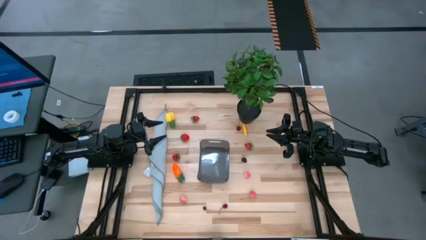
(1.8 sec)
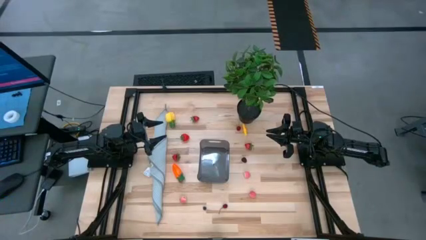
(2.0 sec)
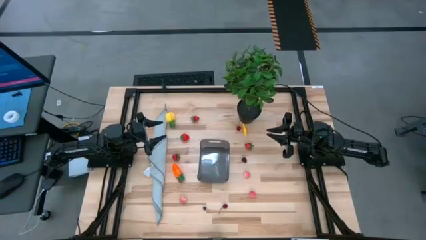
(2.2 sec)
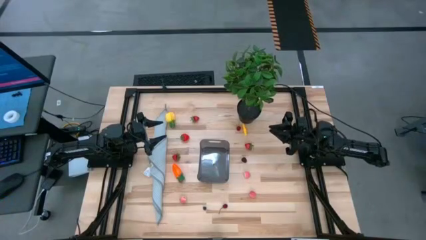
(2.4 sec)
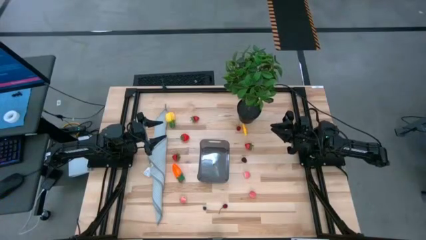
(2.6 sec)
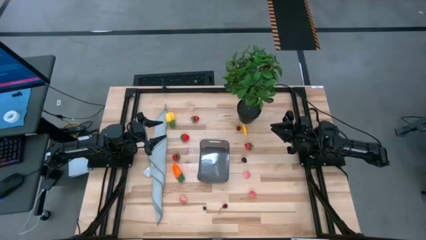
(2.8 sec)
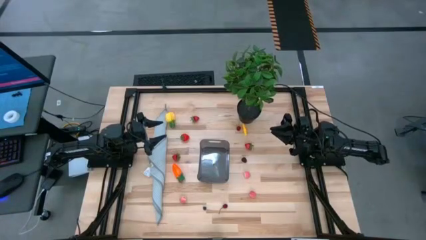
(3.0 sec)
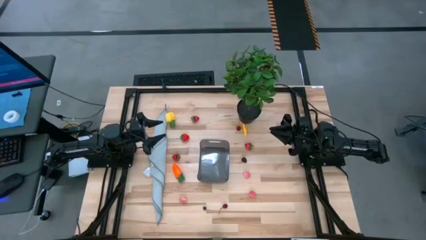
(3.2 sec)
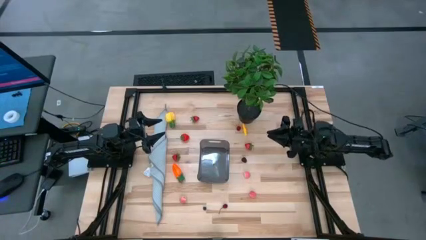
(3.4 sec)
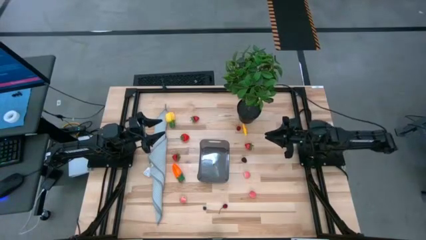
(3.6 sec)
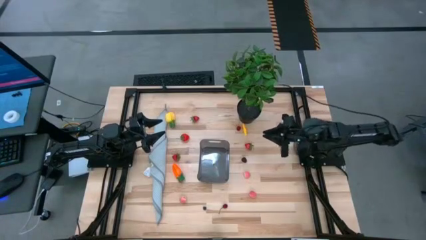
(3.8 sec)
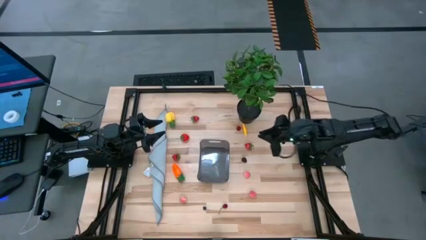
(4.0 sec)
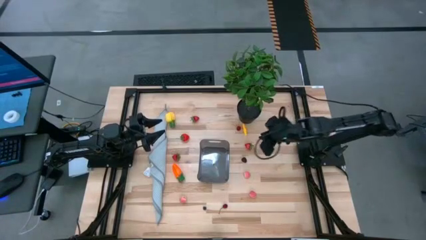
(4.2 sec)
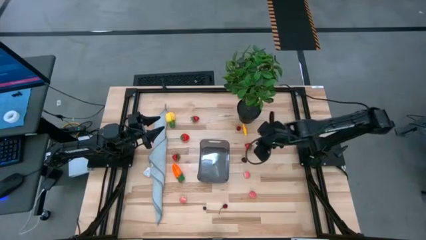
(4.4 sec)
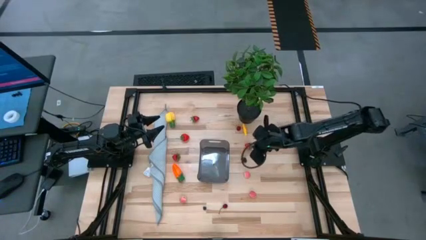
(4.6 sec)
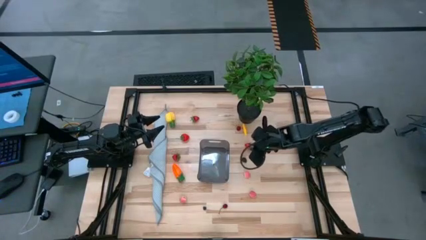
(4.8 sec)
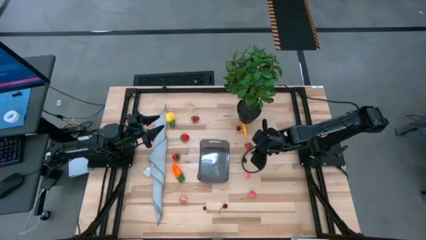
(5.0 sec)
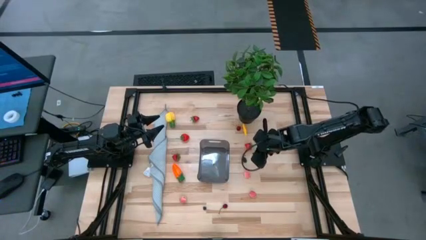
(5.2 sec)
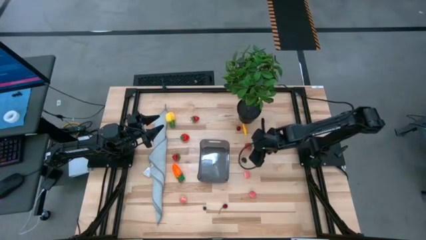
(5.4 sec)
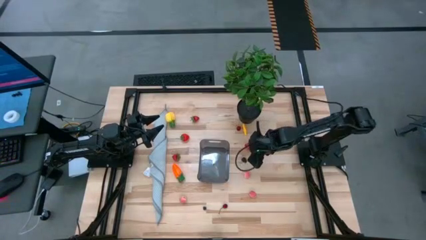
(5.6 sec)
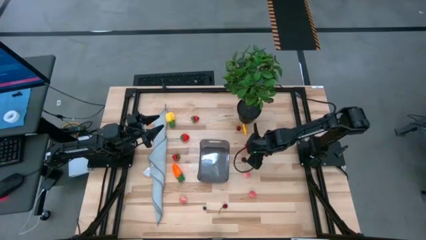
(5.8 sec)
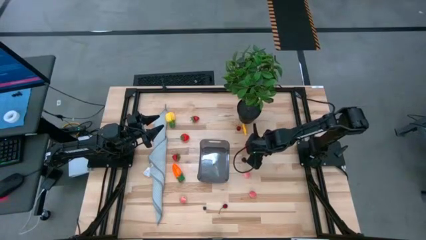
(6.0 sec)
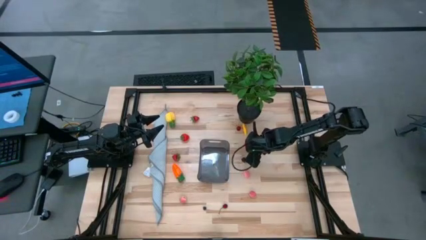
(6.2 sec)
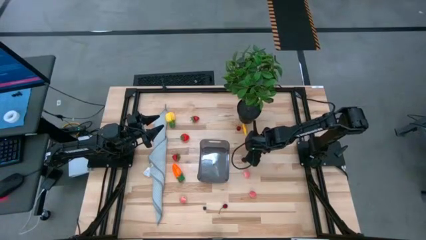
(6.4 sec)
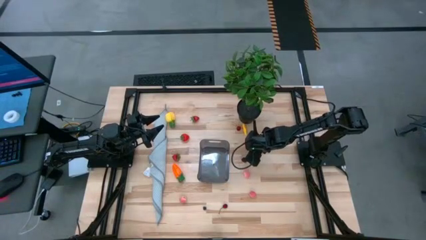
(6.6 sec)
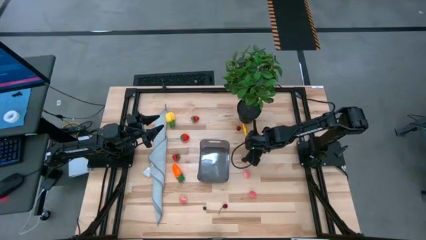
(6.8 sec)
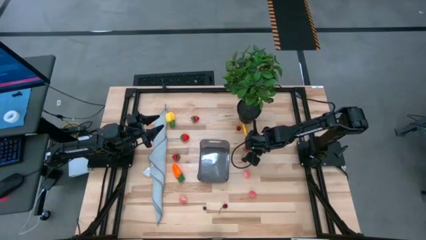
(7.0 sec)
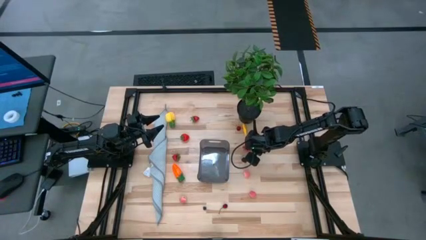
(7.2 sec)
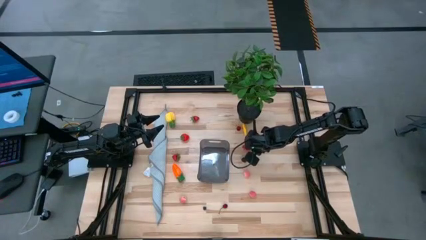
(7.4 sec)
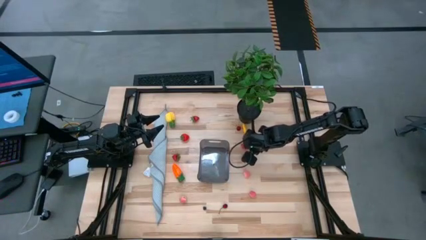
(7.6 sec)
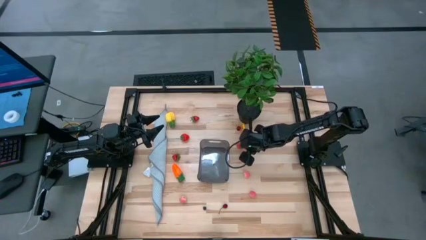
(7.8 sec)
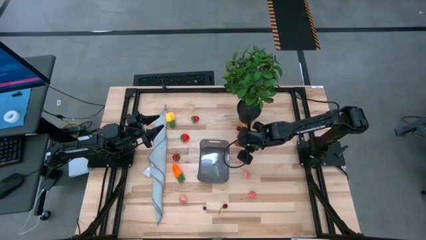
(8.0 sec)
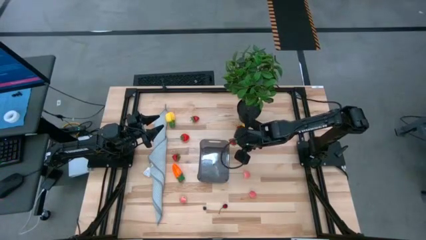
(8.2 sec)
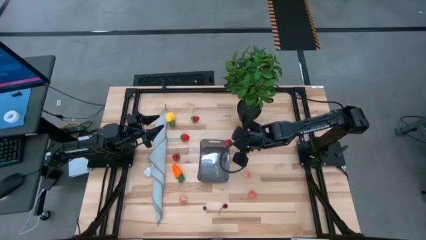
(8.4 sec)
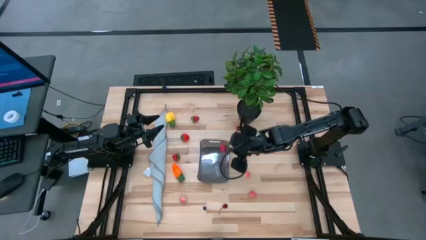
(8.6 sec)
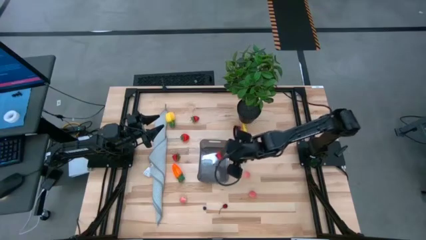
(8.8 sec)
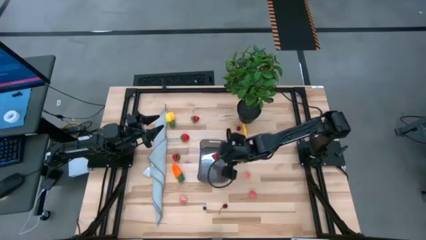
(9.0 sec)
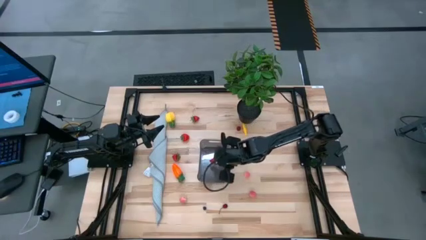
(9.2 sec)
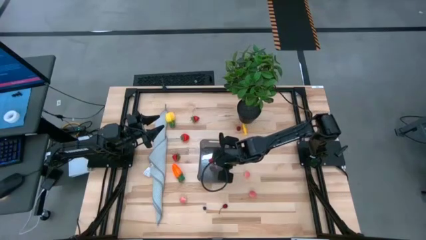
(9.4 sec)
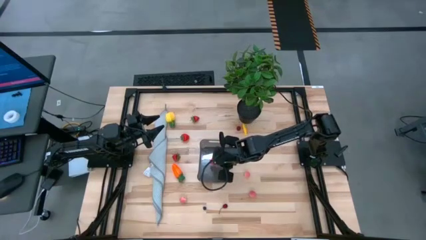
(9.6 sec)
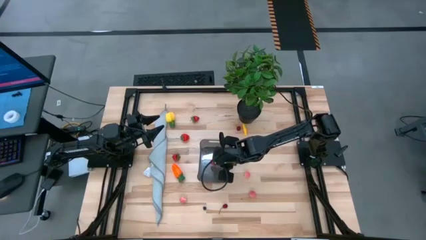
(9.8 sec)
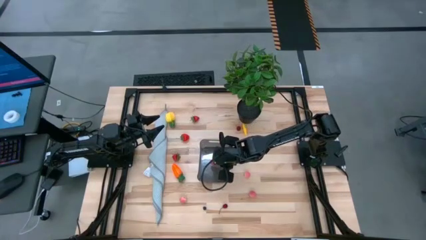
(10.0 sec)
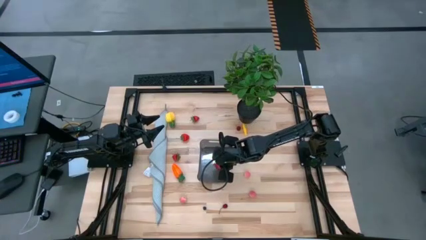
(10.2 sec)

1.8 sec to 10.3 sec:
Task: Pick and placing Produce into tupperware
Put the strawberry into the bin

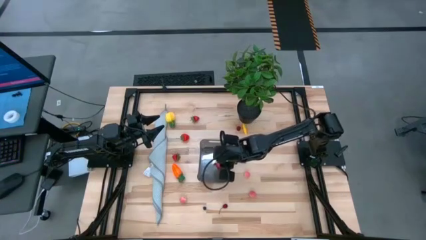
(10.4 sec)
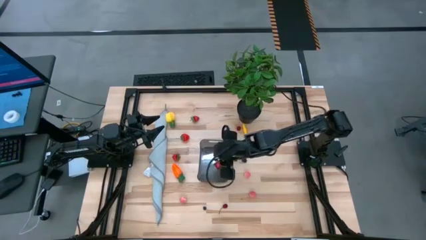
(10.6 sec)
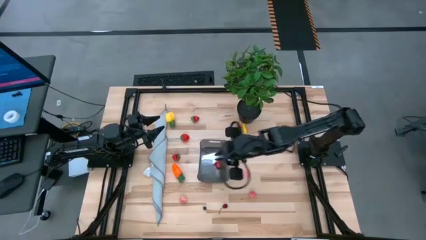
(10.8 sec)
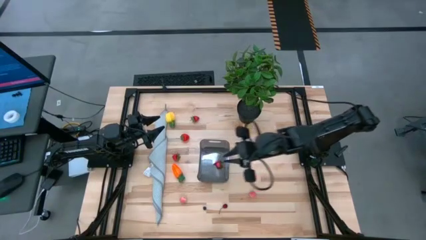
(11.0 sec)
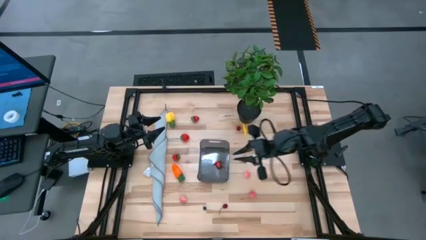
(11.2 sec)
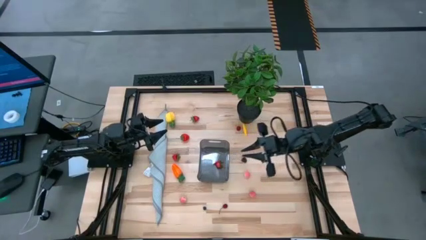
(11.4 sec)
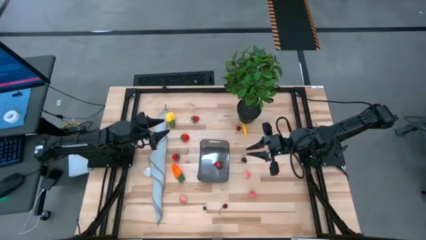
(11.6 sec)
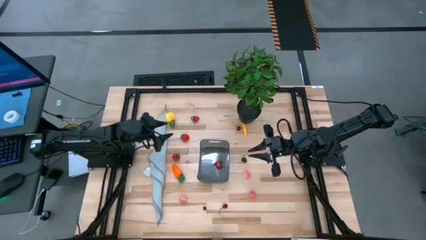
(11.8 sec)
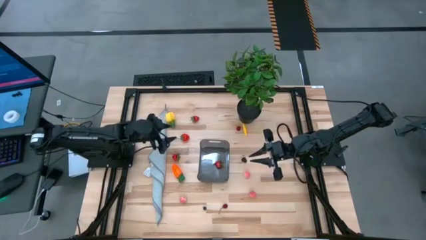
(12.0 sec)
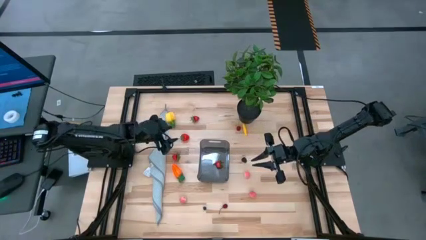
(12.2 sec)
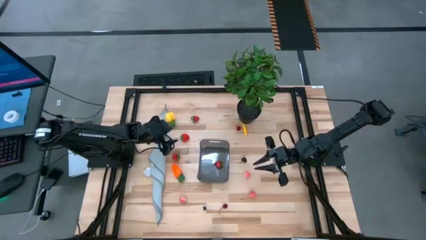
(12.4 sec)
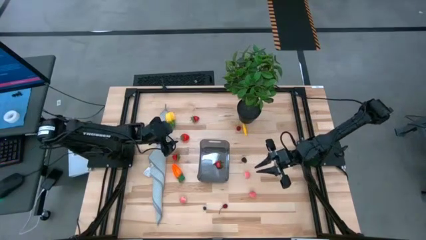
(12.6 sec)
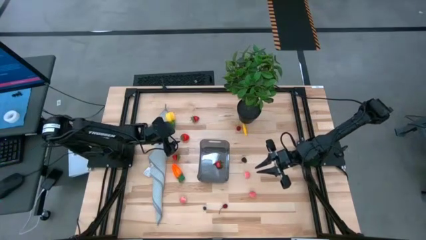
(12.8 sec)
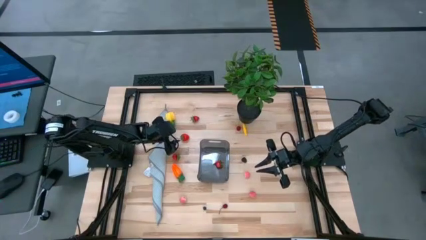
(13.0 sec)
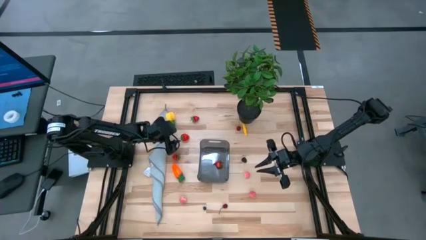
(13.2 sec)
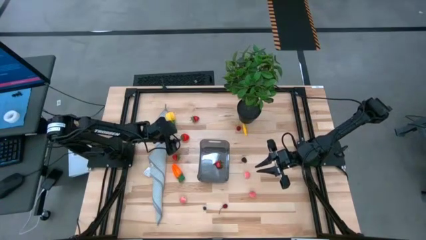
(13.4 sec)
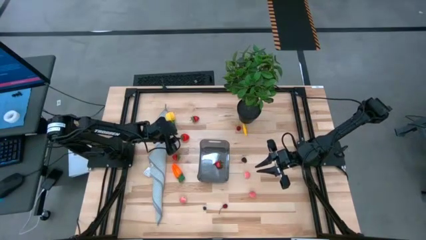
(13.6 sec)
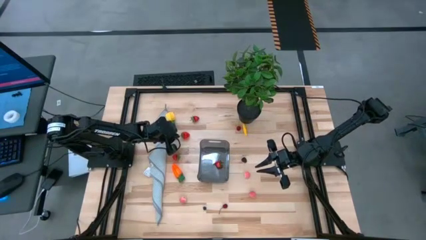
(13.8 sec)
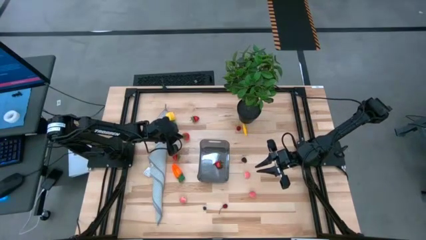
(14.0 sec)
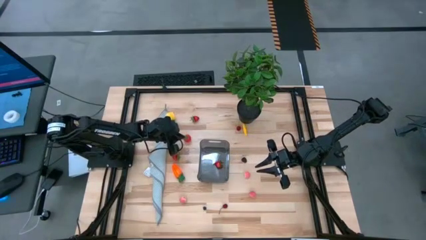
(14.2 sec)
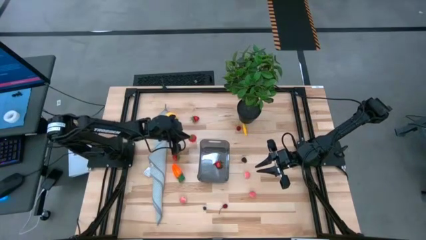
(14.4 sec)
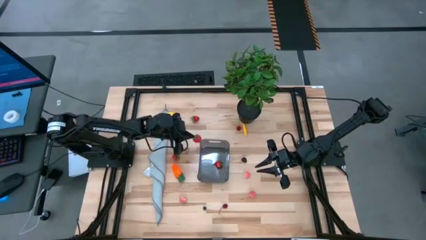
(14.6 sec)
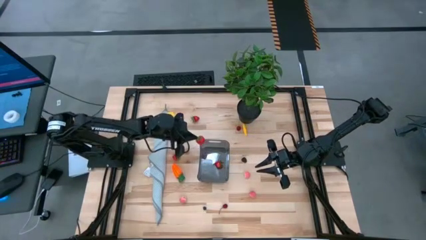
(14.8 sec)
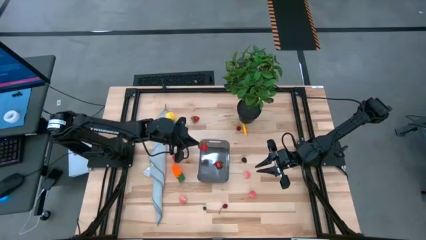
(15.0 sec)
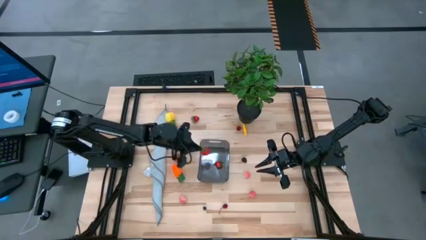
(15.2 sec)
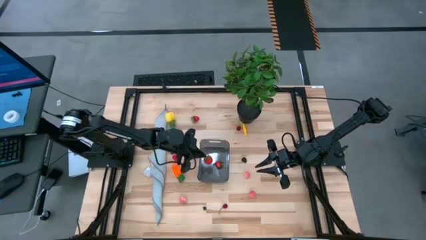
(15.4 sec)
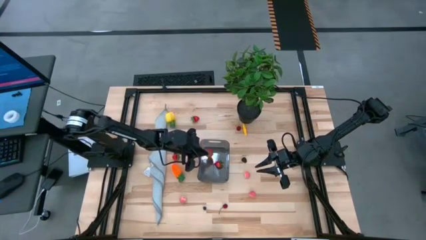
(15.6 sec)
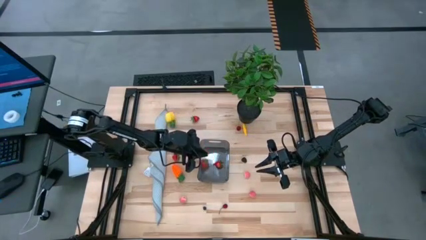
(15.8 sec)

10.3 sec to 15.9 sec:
Put the middle strawberry into the bin

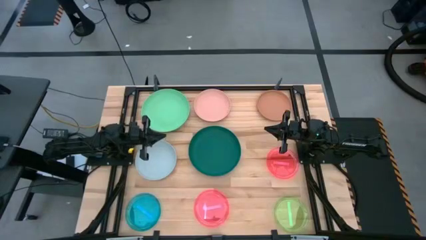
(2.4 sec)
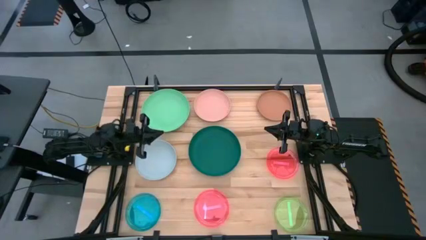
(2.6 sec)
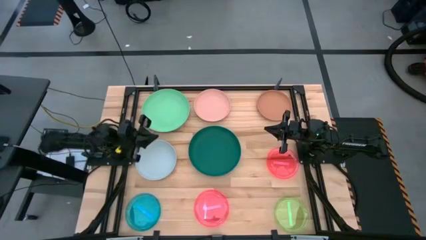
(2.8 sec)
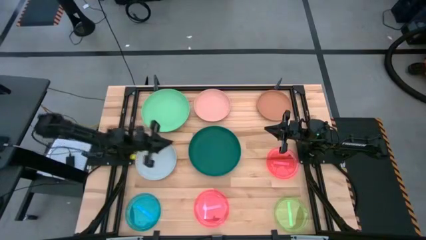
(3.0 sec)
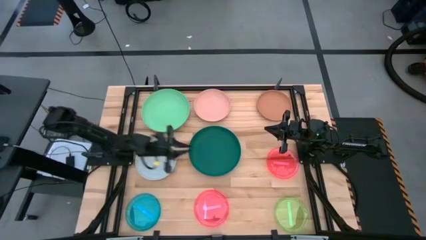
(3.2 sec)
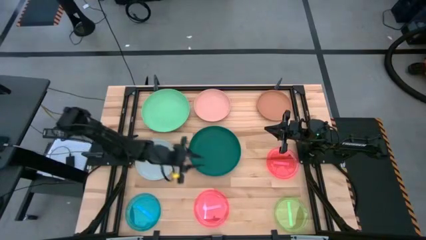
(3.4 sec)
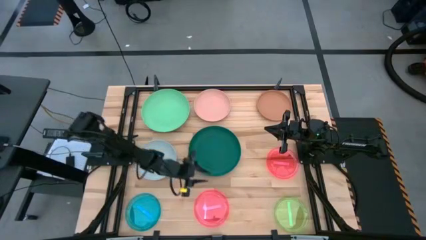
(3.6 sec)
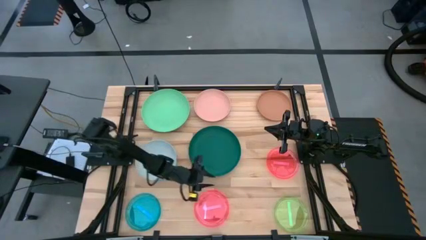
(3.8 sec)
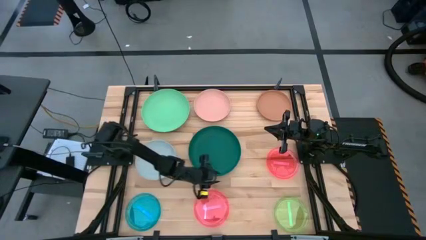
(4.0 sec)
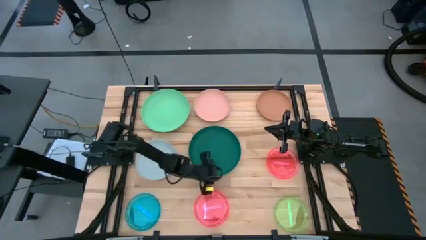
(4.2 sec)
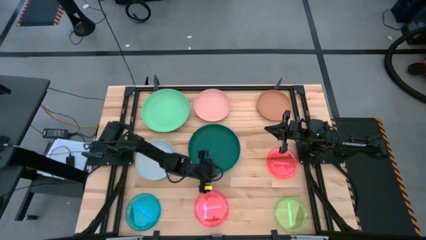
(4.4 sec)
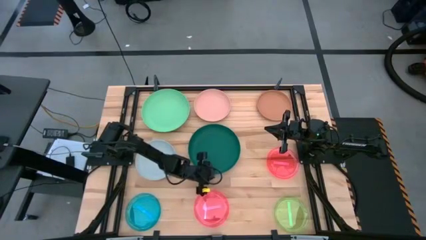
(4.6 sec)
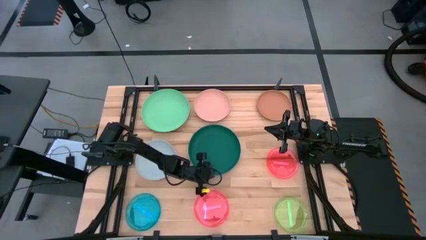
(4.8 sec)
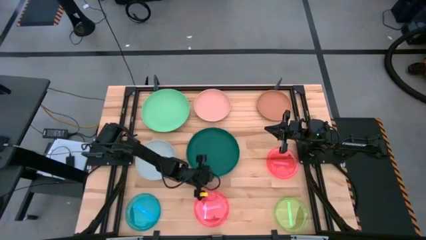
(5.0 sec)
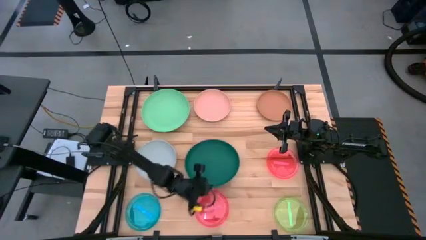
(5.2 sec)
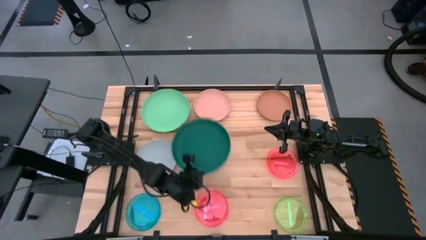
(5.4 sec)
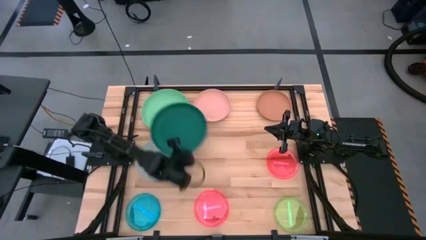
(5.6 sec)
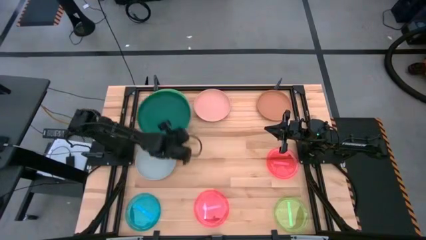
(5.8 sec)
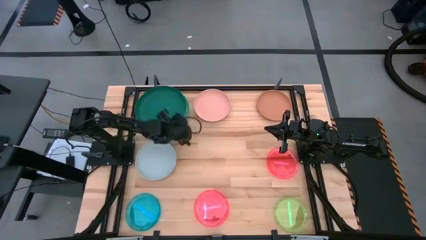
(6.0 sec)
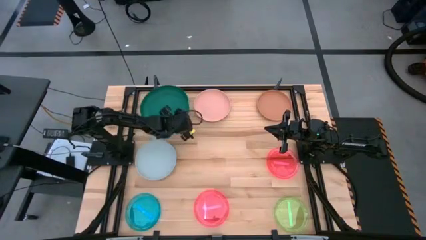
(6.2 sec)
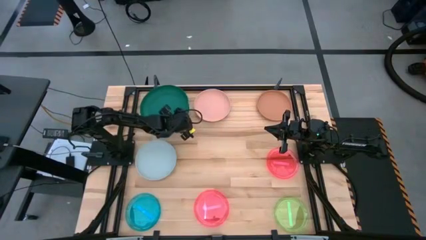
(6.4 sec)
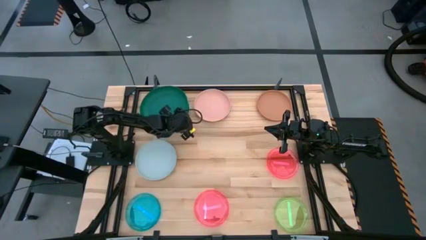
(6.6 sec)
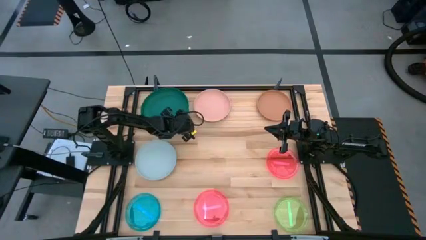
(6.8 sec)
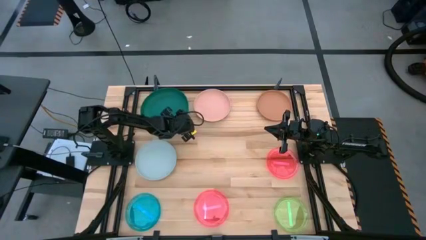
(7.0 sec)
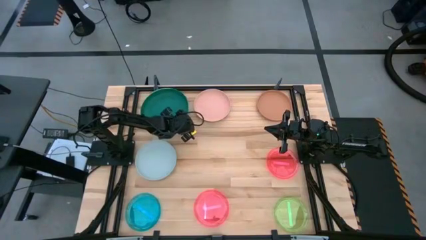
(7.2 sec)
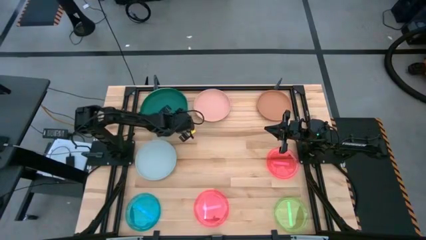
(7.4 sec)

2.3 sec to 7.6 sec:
Task: Stack plastic plates
Stack the dark green plate on top of the green plate
